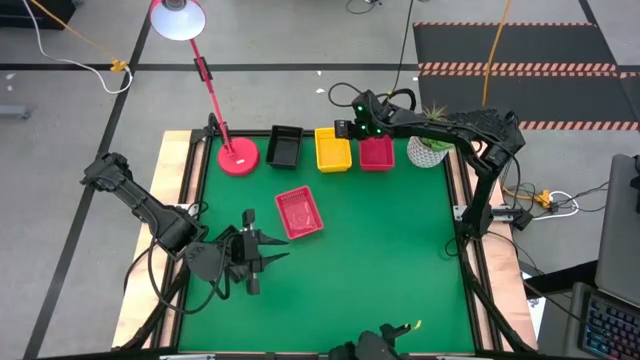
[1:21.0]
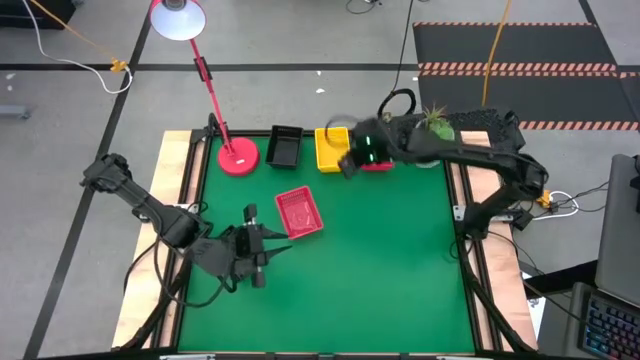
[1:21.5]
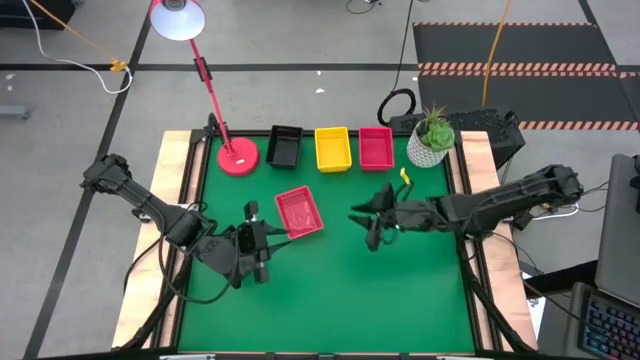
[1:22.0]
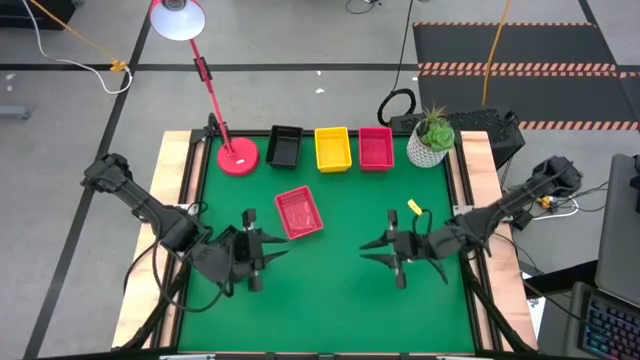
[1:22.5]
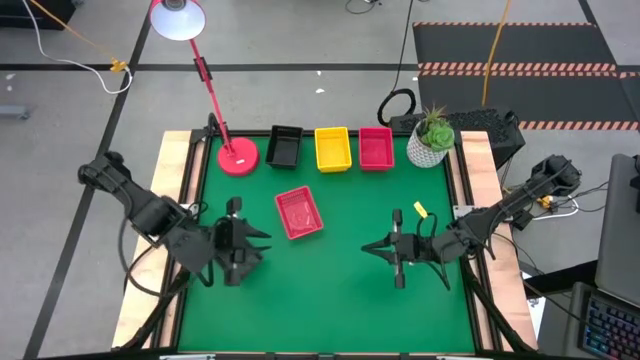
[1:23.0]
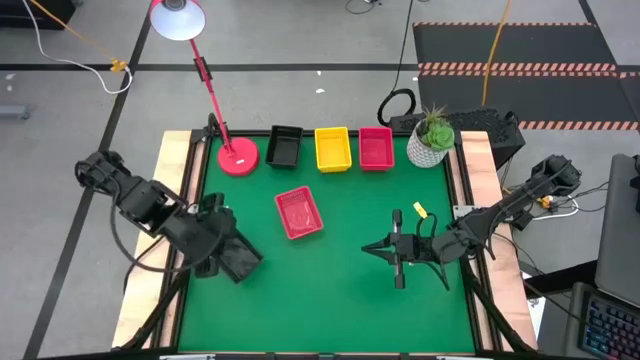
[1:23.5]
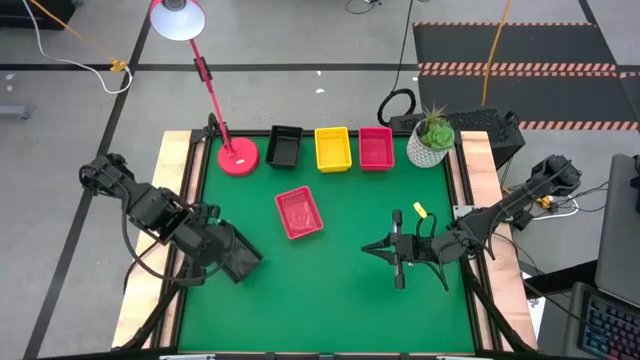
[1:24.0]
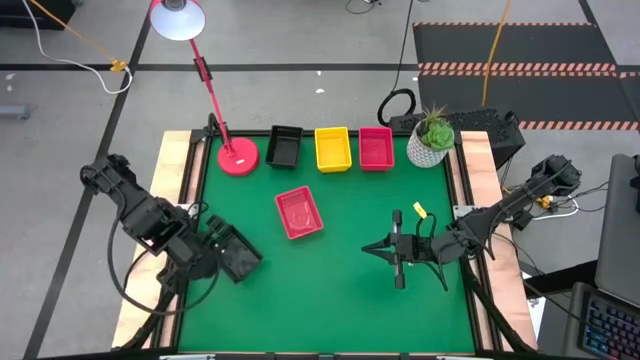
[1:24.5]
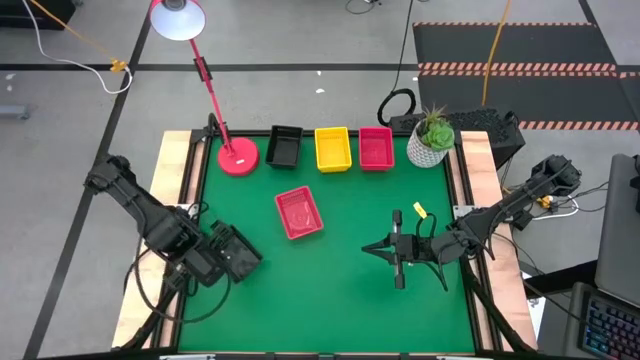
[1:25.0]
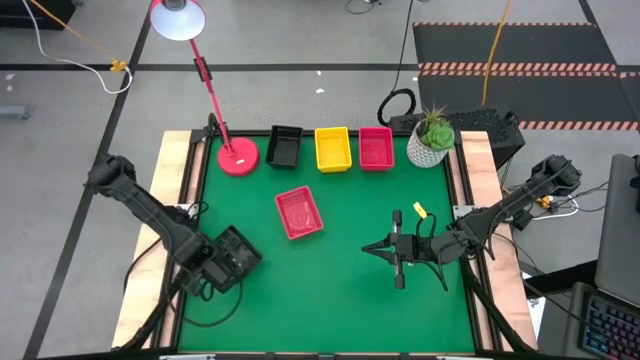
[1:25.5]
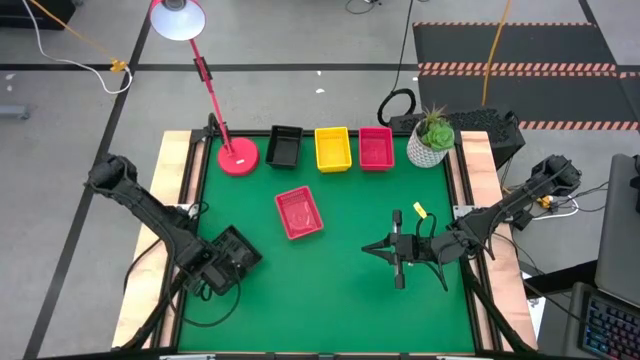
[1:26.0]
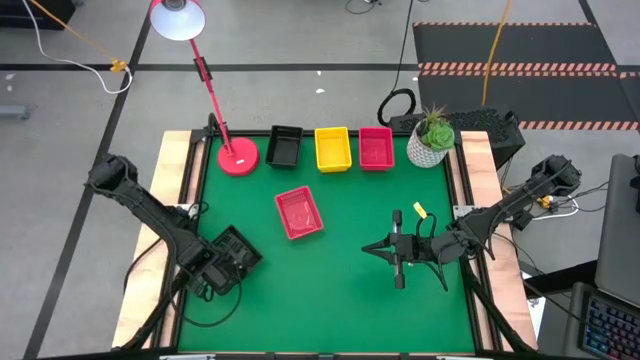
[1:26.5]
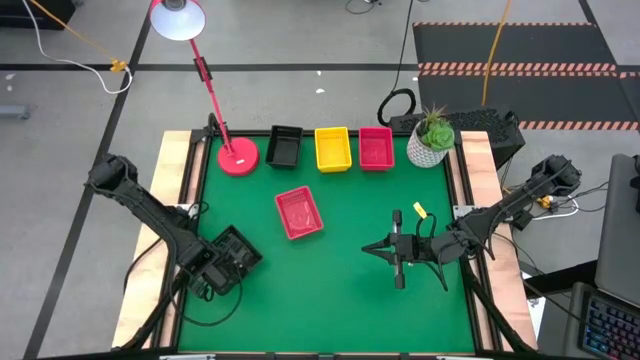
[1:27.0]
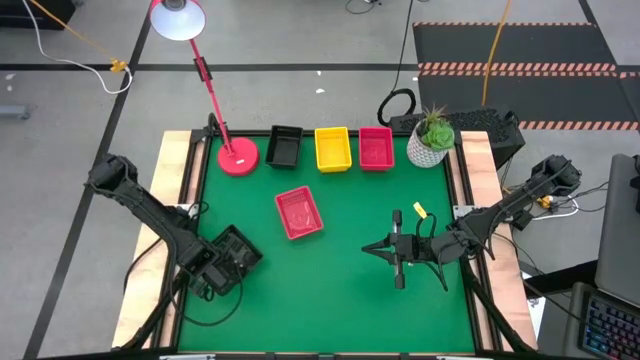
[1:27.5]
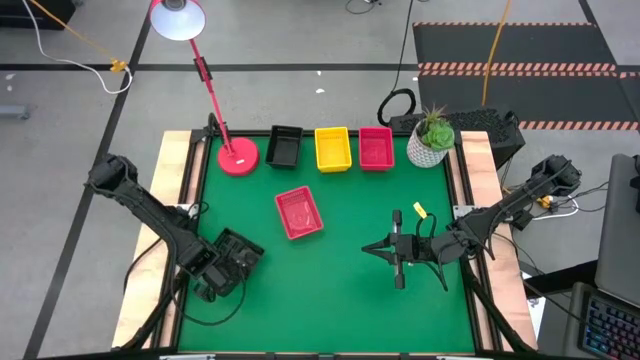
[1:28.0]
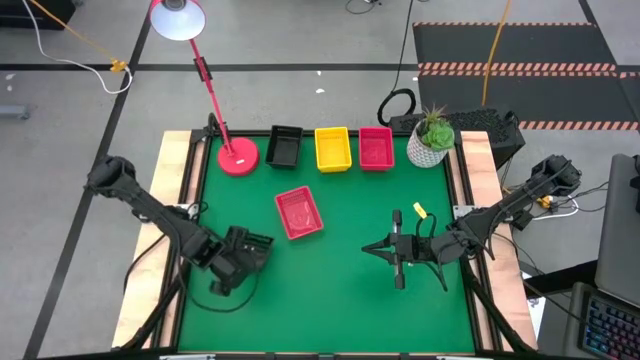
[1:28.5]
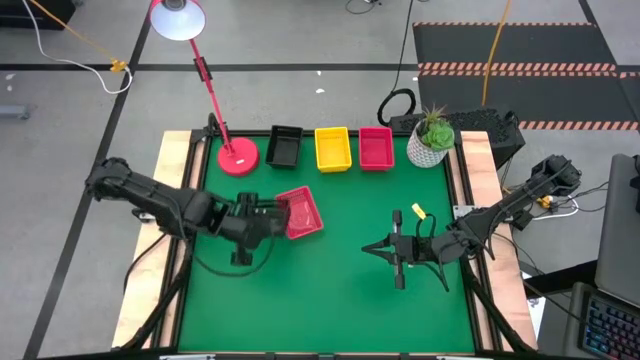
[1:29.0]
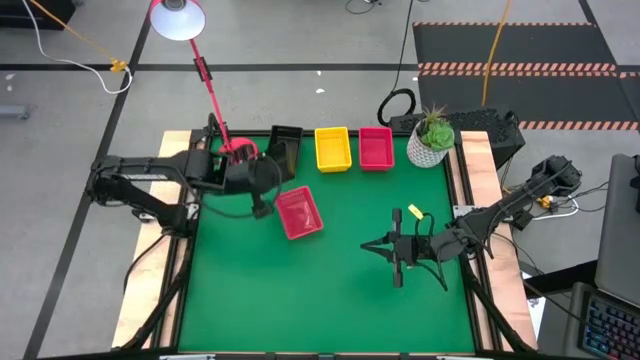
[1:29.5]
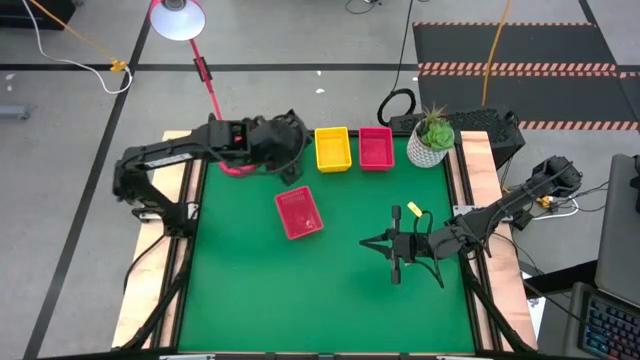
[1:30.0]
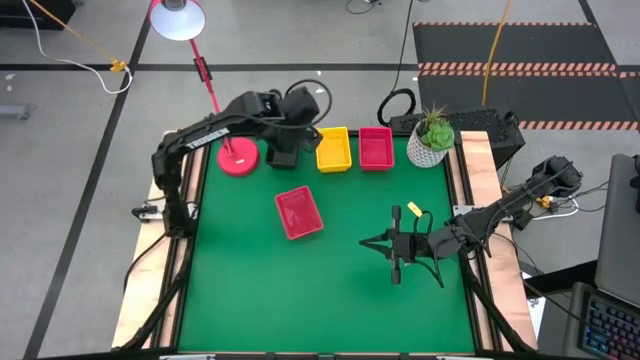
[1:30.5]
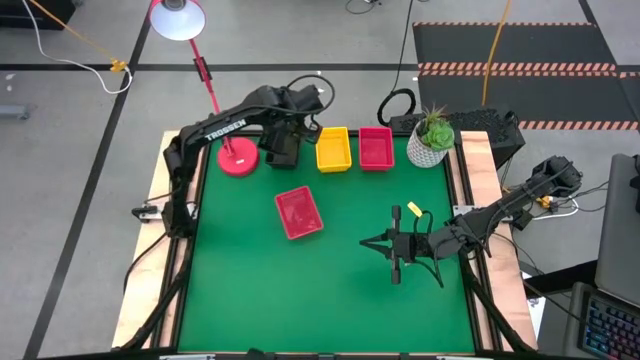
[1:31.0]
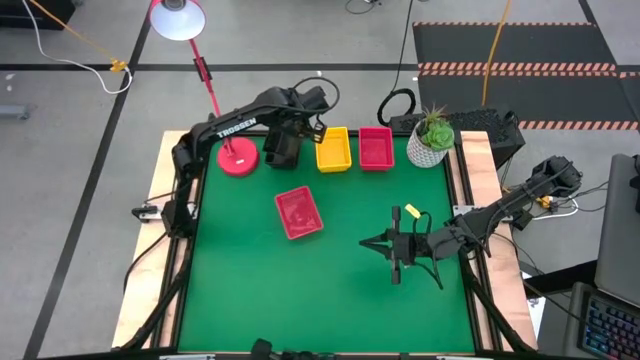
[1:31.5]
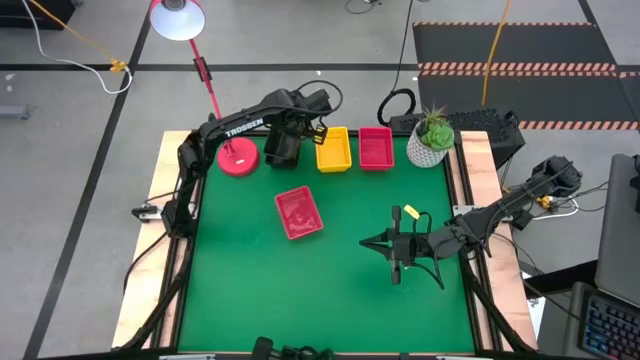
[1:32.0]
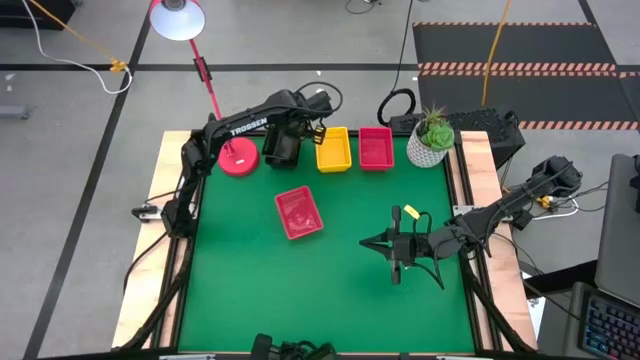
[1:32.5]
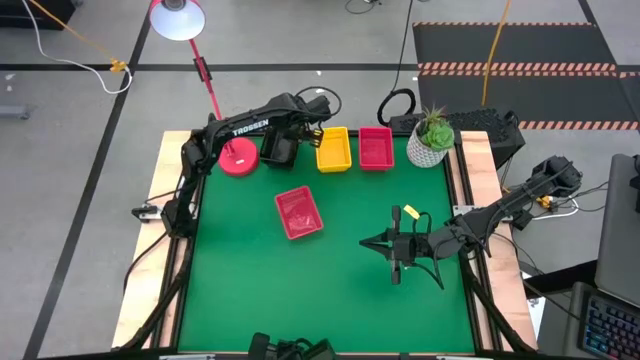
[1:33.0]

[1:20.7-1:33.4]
Stack the bottom black bin on the top stacked black bin

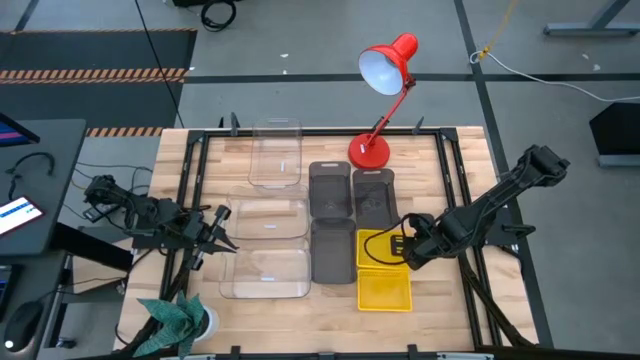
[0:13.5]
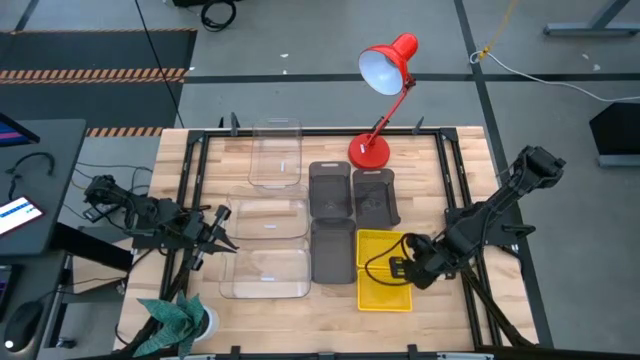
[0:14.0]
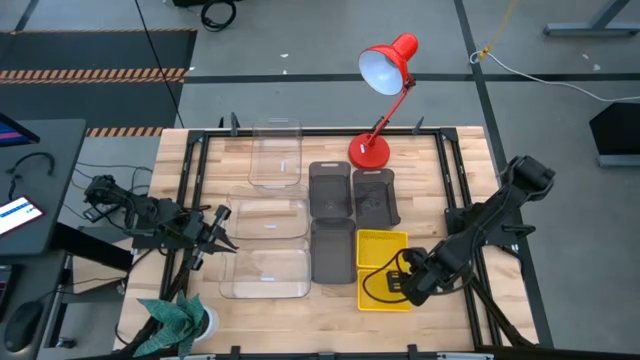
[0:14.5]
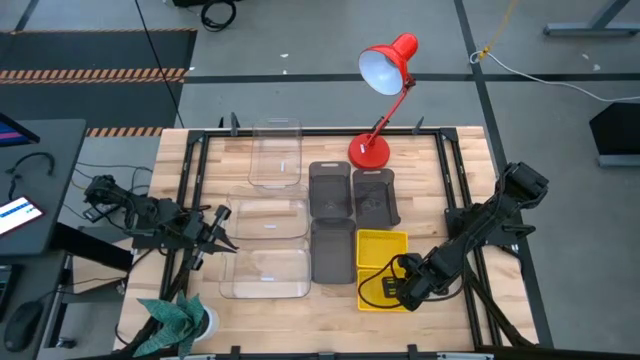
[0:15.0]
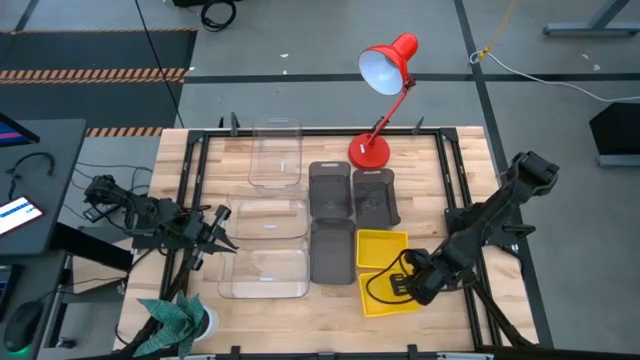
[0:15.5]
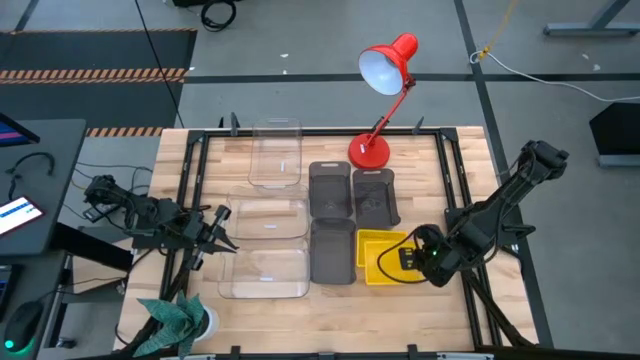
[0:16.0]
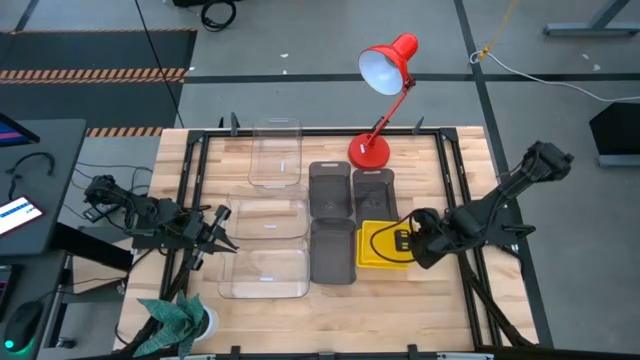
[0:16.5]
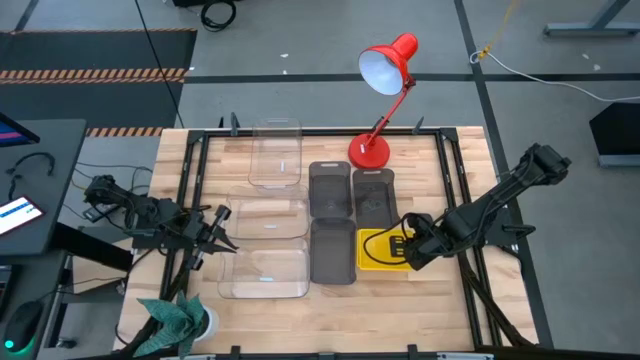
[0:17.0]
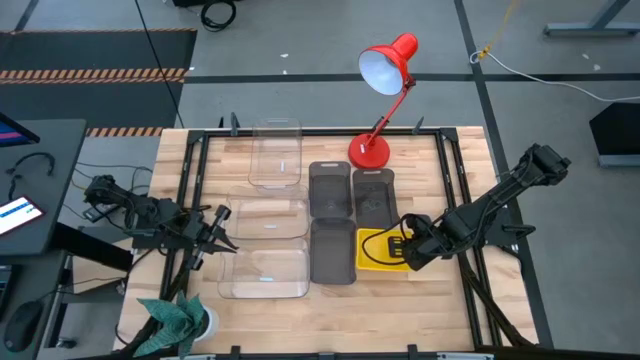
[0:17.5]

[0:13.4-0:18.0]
Stack the bottom yellow bin on the stacked yellow bins

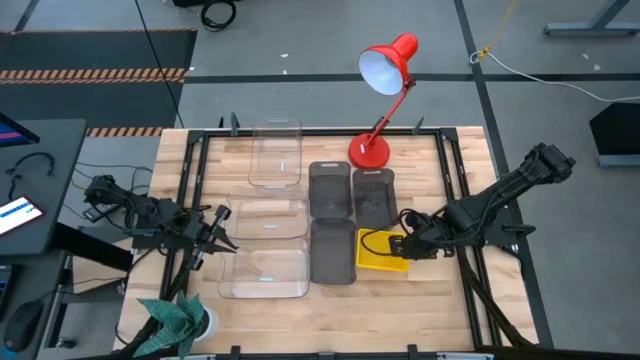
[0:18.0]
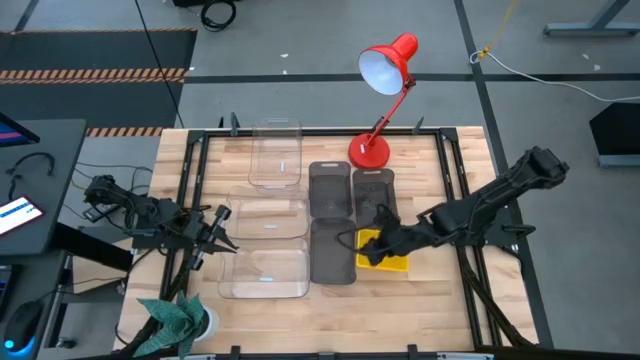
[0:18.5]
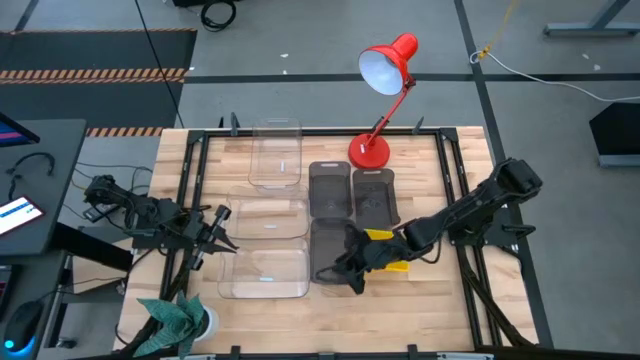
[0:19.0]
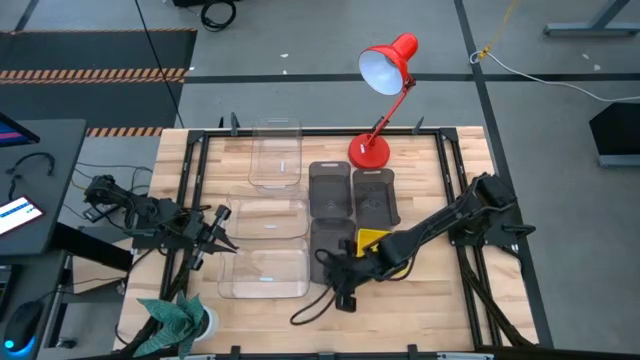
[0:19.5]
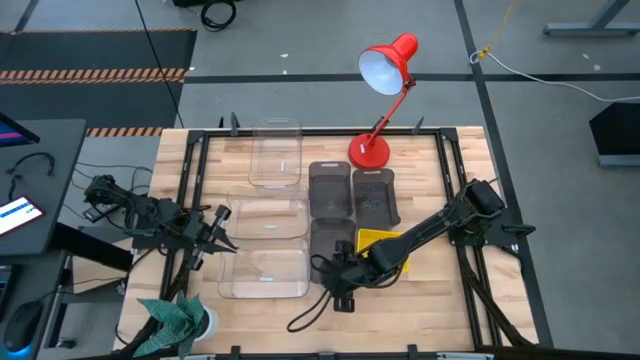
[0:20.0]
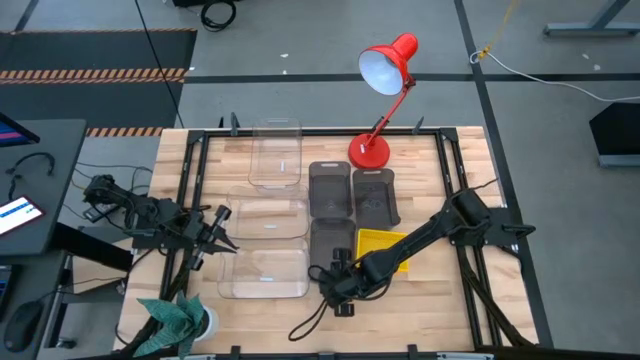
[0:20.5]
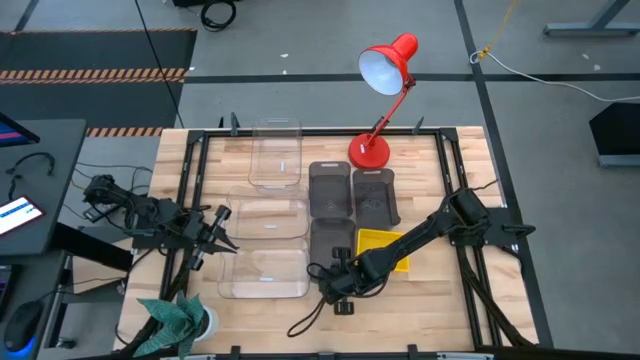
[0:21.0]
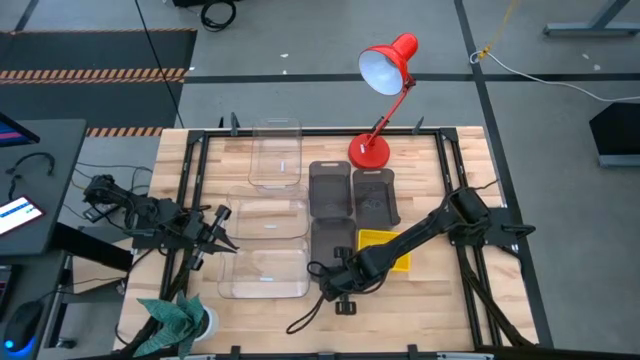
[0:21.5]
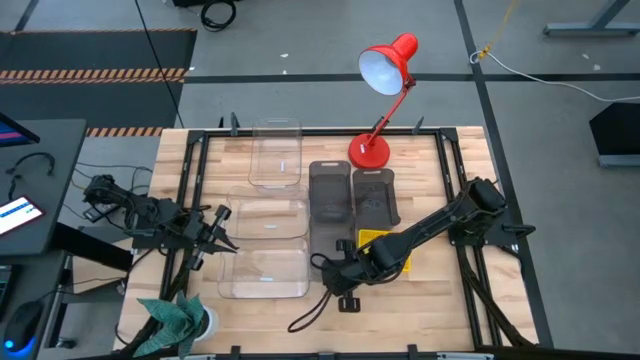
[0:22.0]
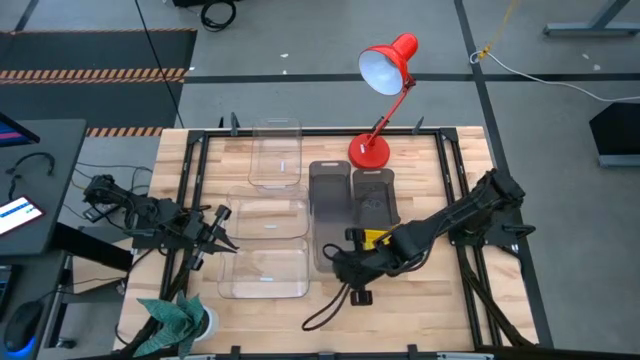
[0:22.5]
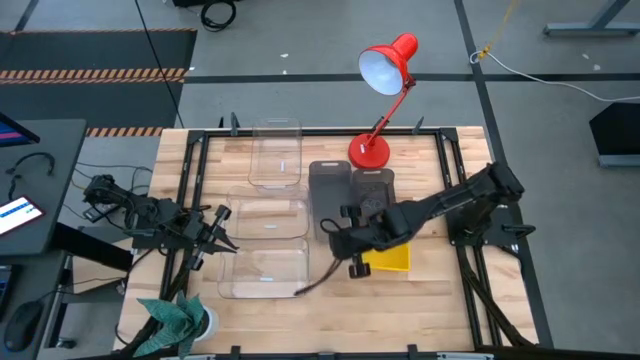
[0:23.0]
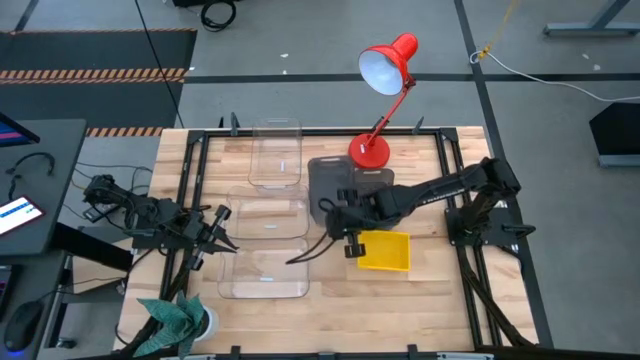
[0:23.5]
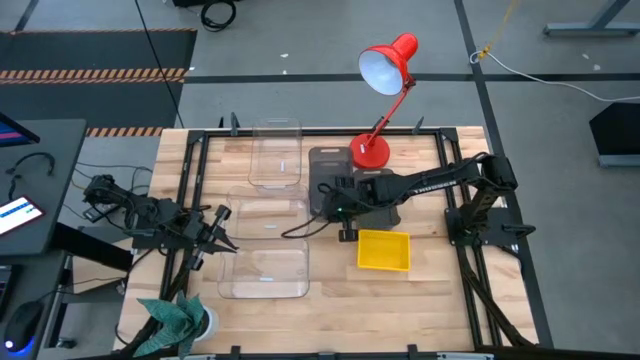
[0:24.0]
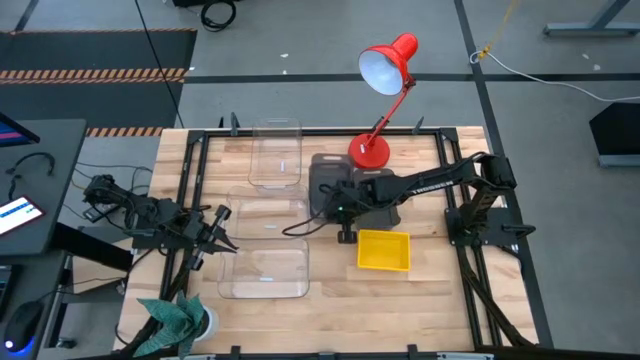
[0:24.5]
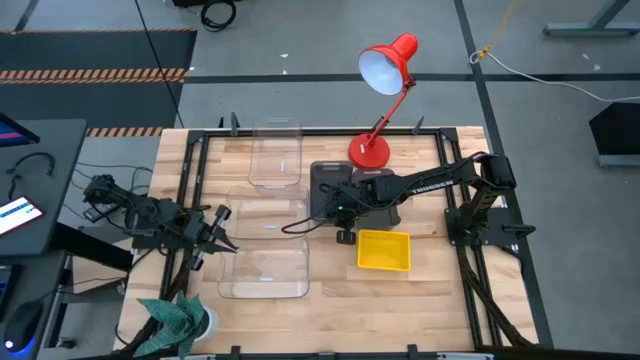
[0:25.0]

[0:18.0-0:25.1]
Stack the bottom black bin on the top left black bin
